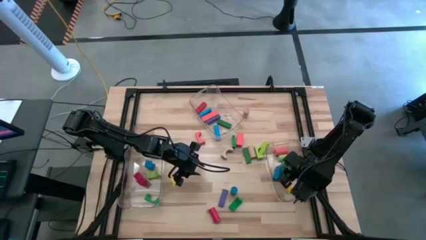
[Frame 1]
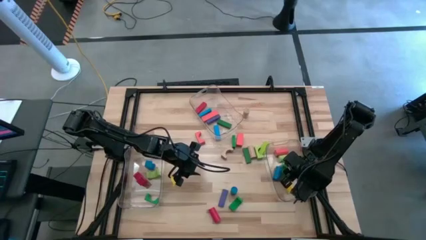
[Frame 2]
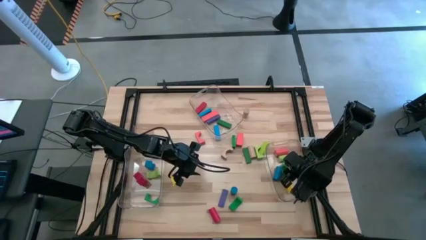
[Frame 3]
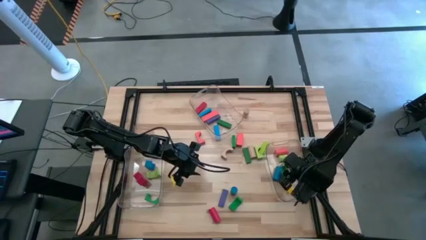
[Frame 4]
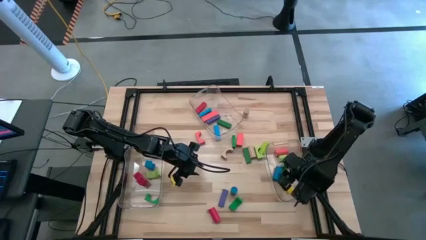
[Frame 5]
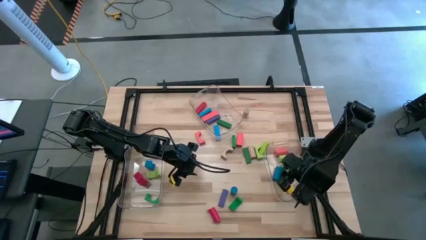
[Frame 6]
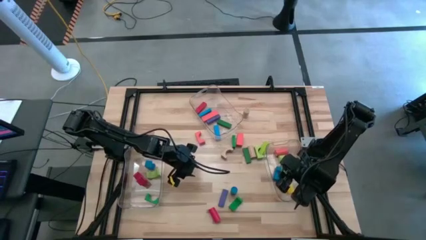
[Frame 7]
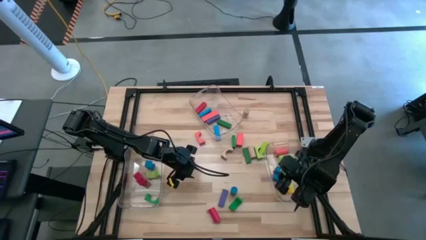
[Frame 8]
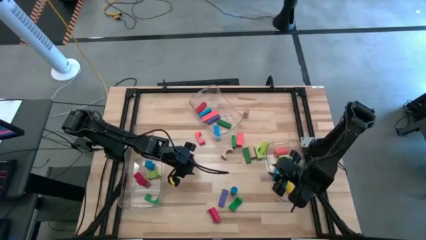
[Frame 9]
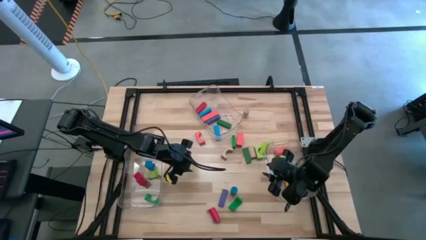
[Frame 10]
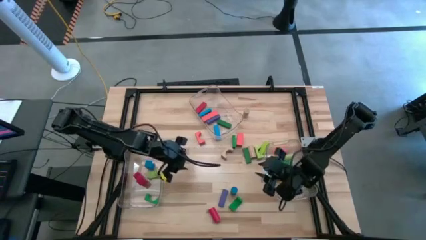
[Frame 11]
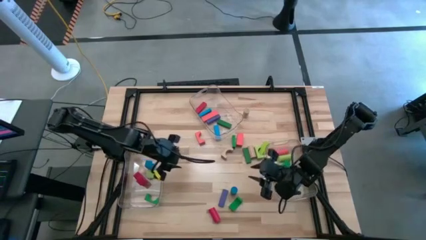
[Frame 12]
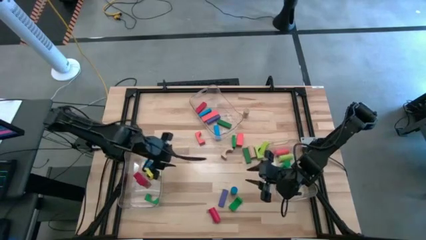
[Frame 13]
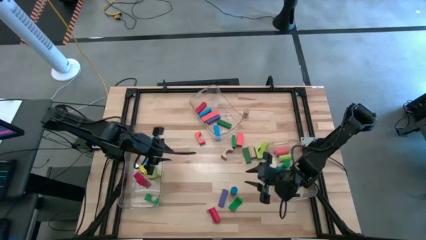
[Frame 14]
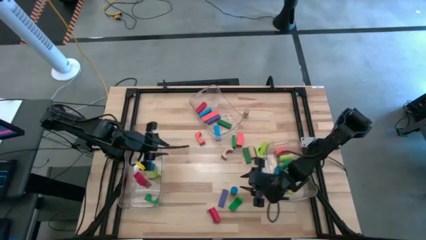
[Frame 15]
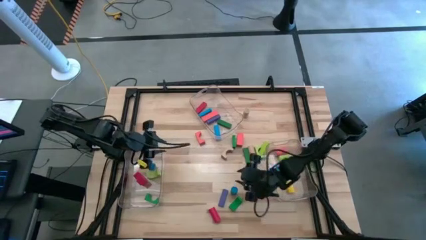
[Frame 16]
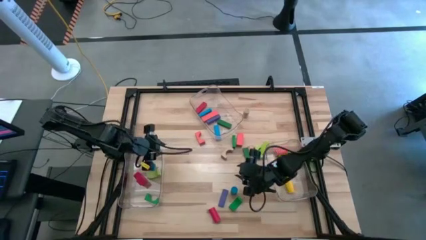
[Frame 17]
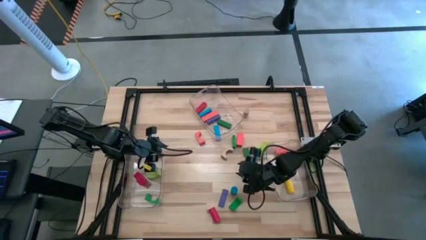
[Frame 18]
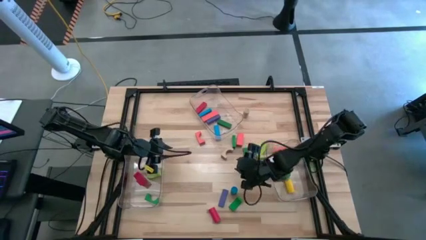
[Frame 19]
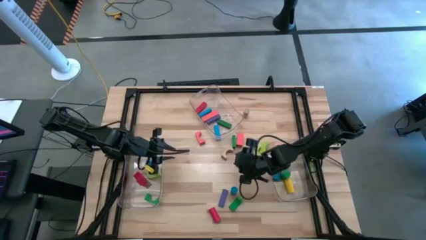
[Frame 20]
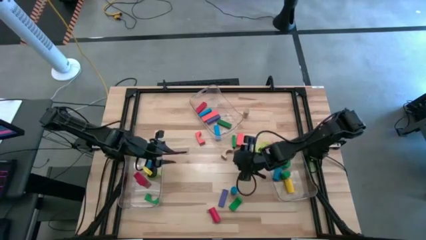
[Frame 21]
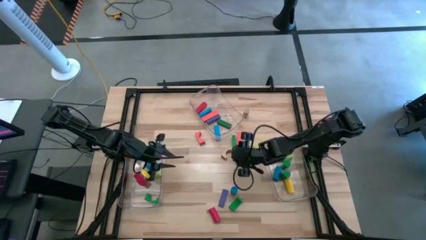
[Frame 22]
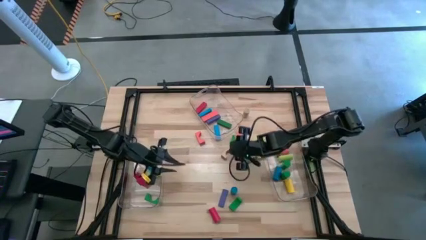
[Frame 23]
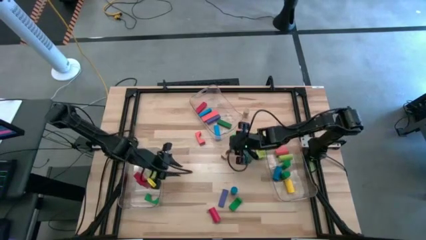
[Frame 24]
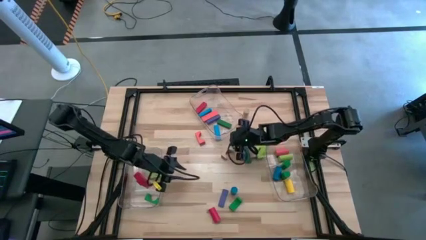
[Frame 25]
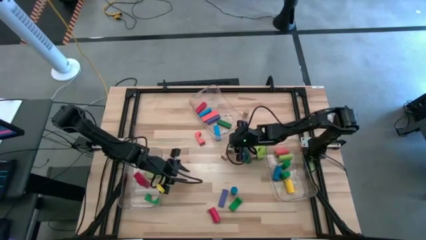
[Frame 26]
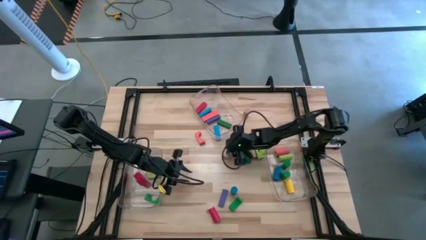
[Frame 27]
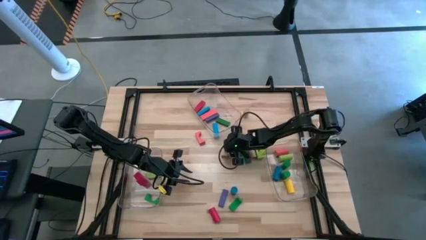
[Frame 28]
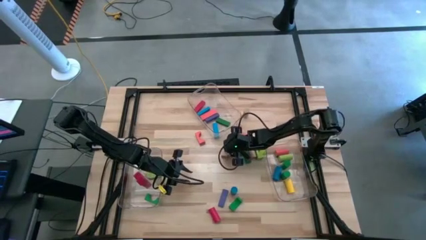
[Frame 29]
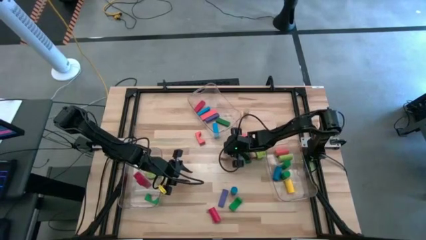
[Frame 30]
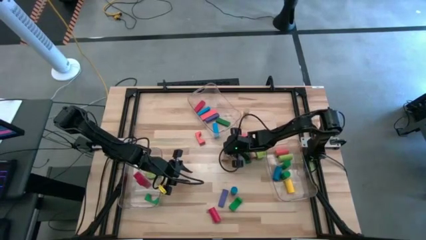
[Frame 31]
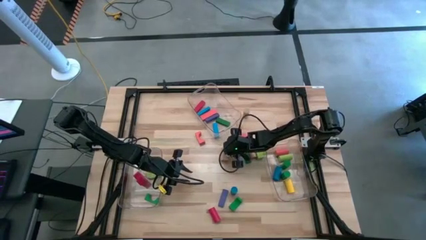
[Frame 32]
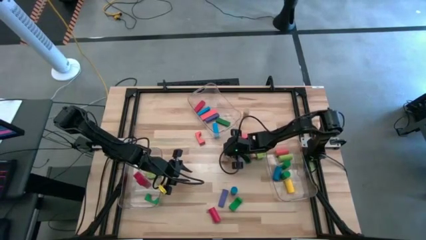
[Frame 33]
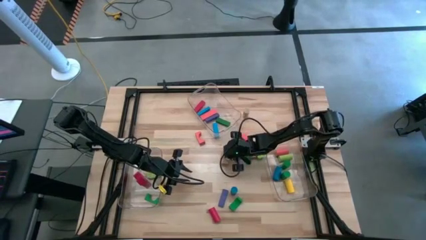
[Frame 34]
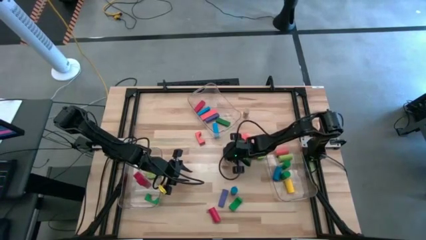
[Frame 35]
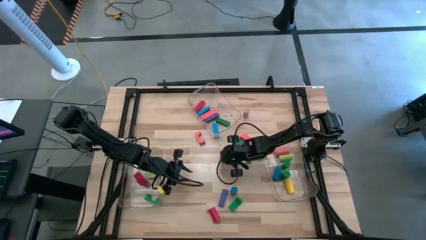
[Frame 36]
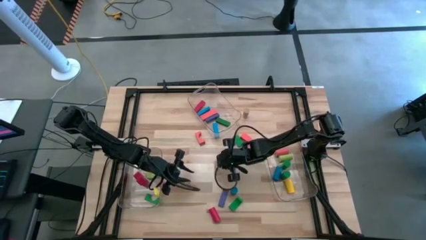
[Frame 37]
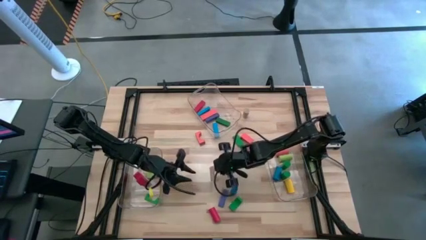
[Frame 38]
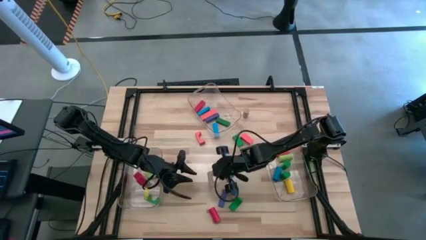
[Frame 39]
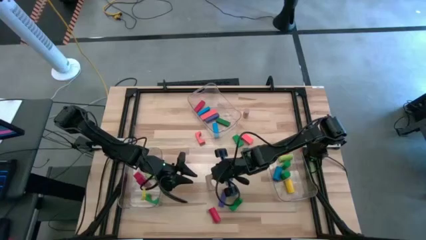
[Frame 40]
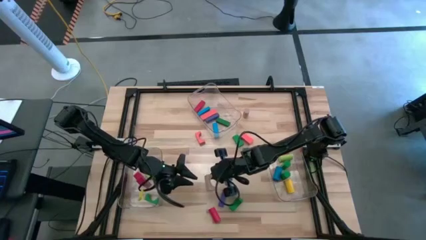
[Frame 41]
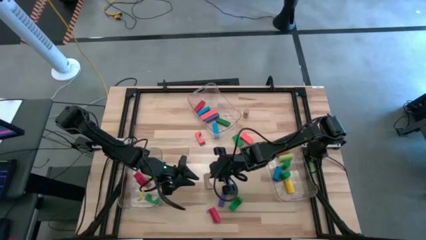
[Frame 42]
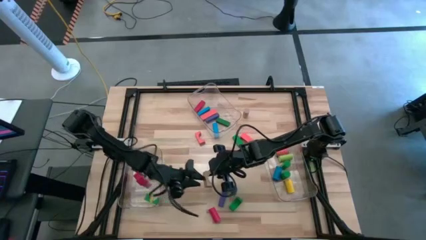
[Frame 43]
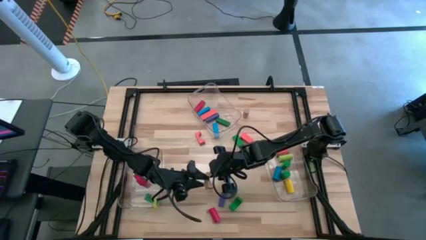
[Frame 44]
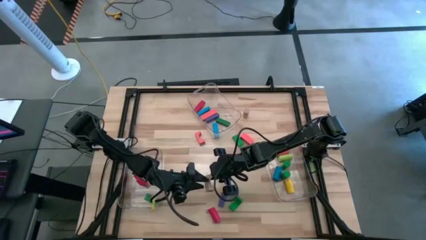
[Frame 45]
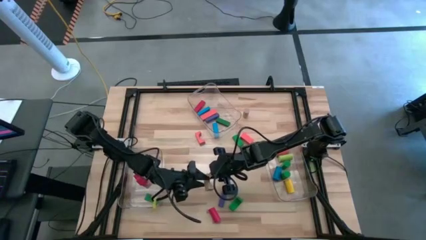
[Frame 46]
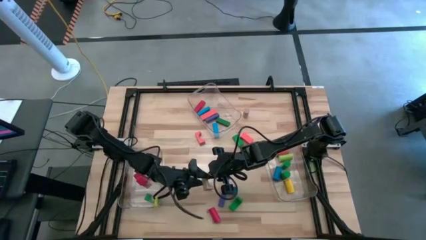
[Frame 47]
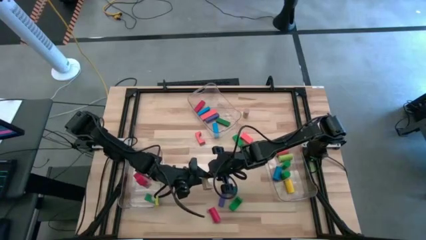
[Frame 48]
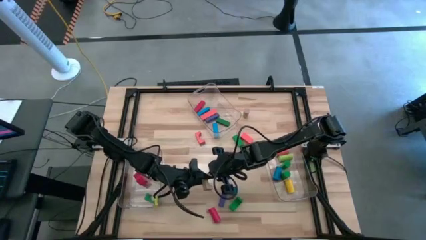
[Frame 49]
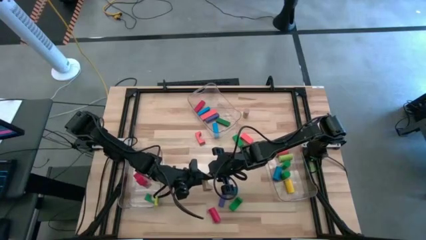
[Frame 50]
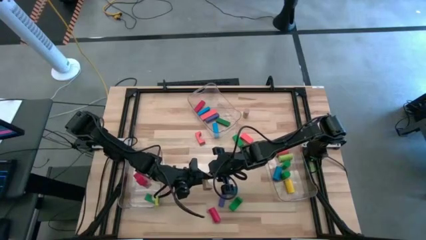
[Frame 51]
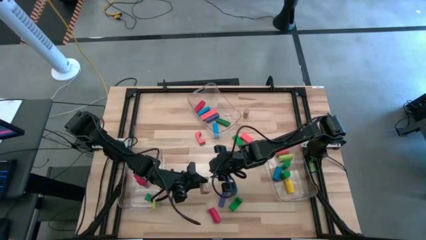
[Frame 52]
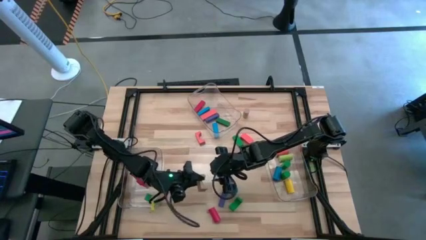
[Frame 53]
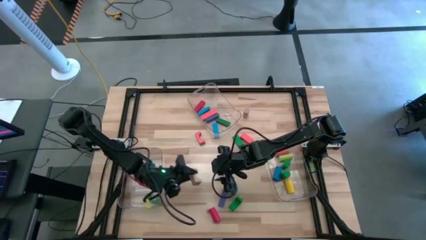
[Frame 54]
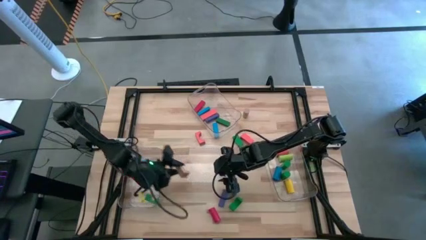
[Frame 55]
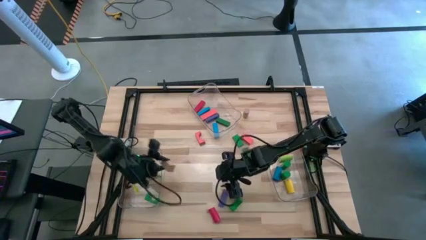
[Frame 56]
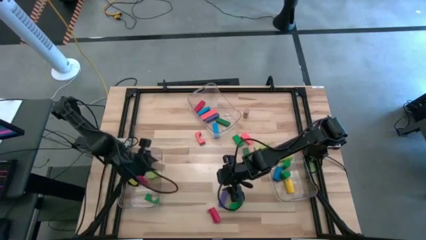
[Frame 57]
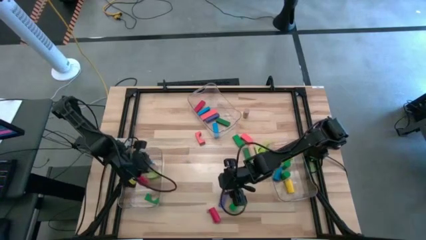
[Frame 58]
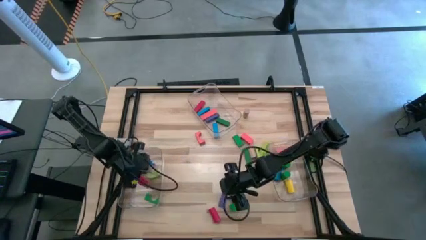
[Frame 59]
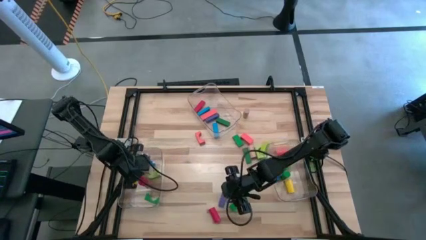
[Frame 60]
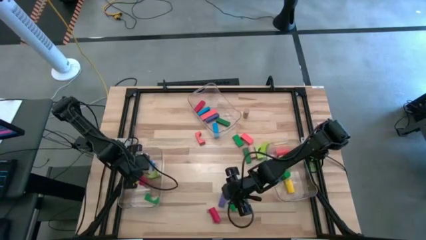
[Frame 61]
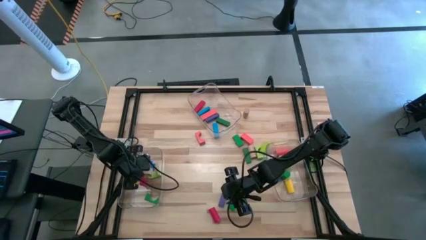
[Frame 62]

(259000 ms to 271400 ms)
Task: Sort blocks by size
Put the brown arc block into the left transparent bin
